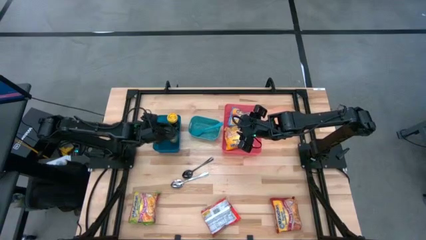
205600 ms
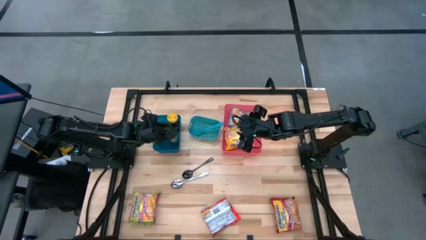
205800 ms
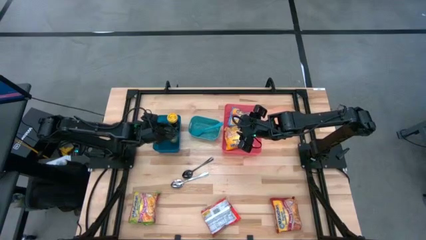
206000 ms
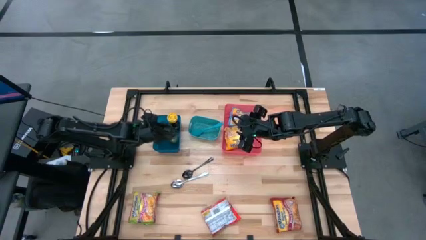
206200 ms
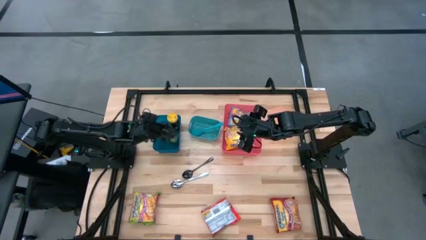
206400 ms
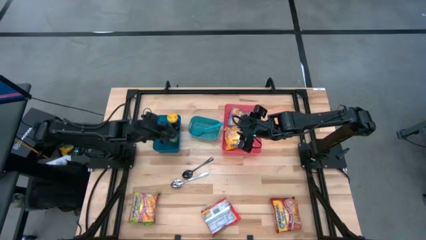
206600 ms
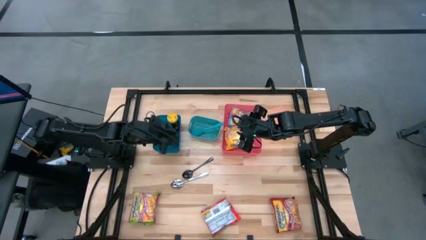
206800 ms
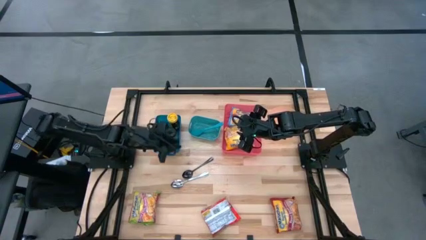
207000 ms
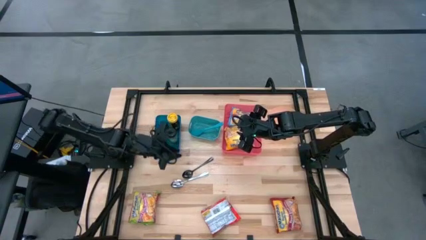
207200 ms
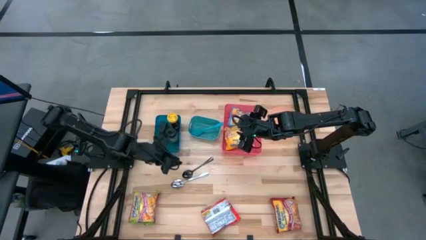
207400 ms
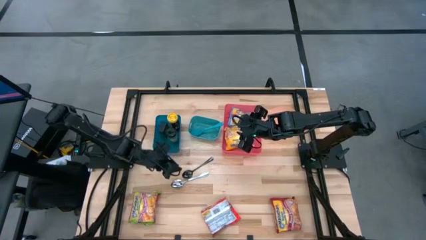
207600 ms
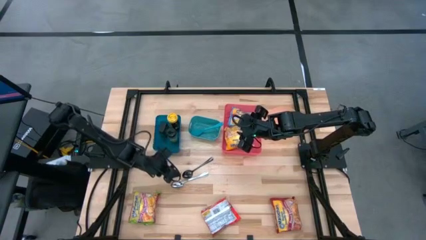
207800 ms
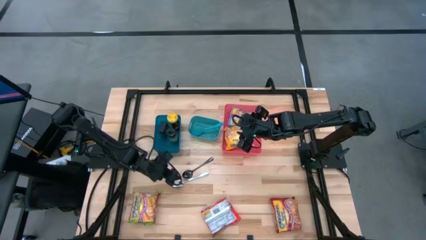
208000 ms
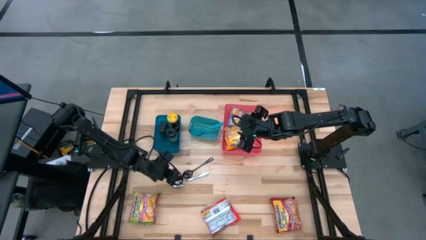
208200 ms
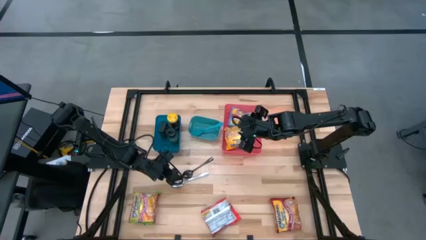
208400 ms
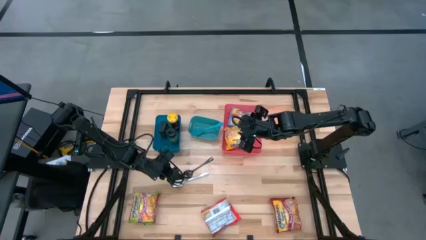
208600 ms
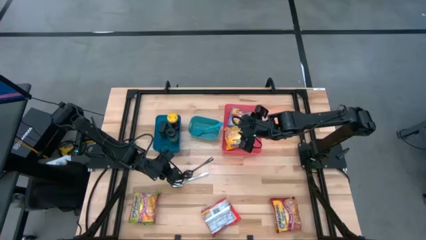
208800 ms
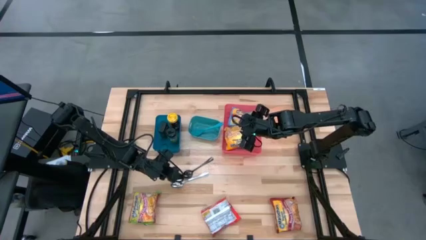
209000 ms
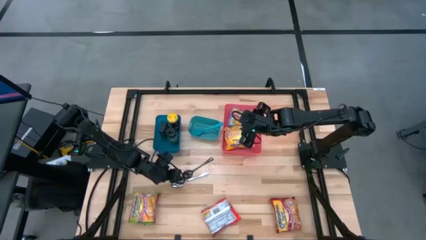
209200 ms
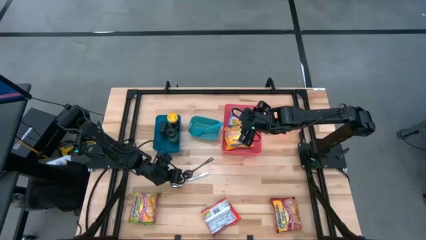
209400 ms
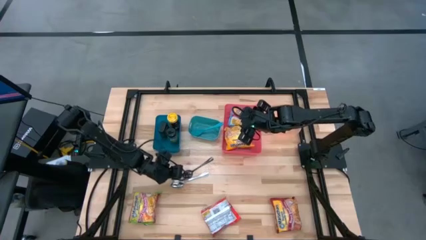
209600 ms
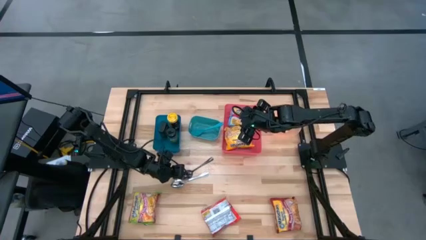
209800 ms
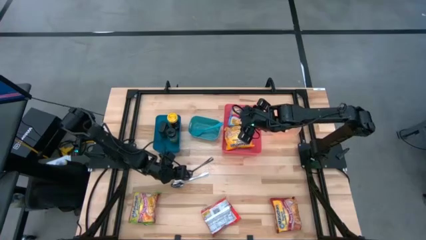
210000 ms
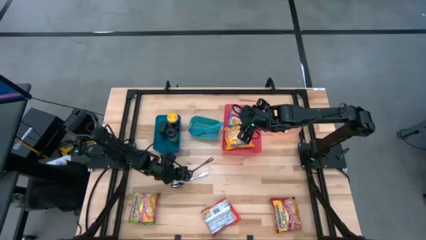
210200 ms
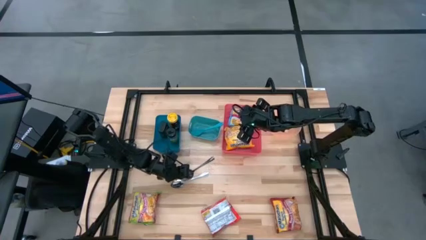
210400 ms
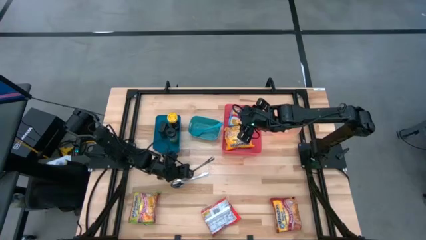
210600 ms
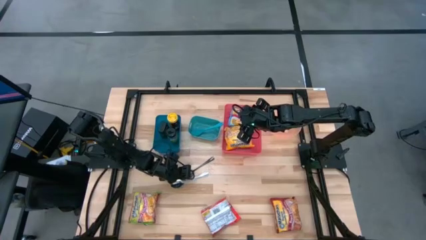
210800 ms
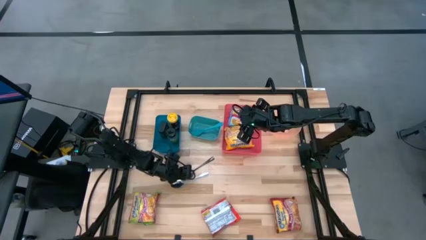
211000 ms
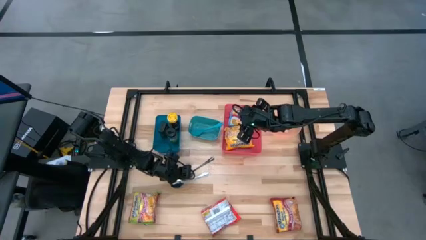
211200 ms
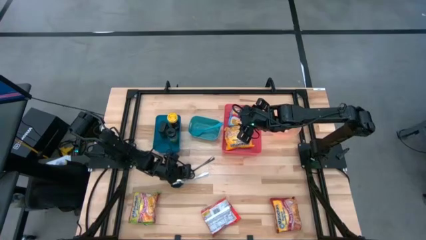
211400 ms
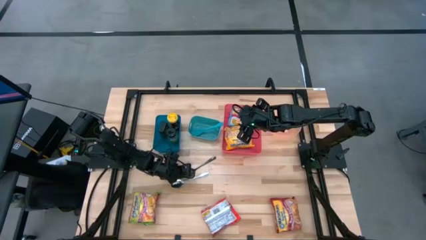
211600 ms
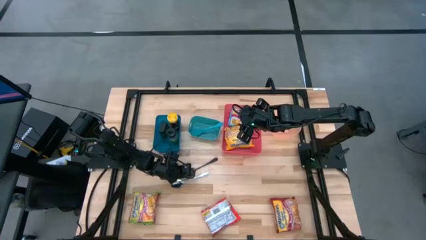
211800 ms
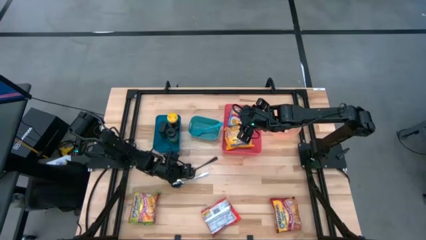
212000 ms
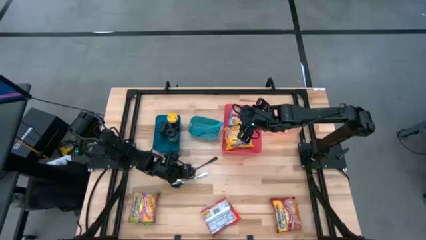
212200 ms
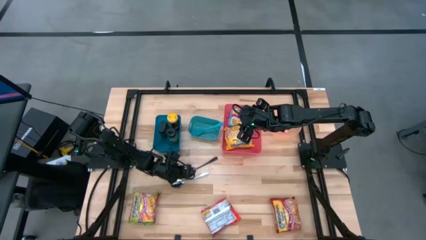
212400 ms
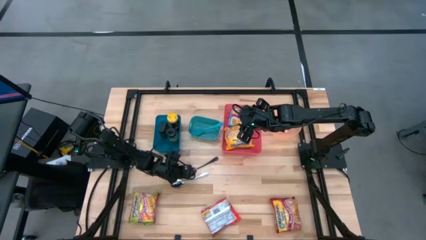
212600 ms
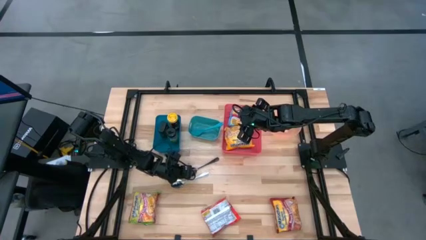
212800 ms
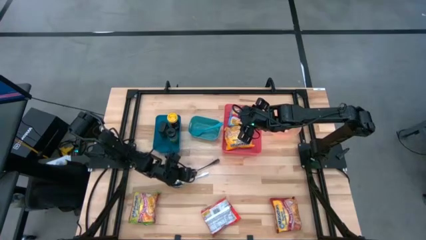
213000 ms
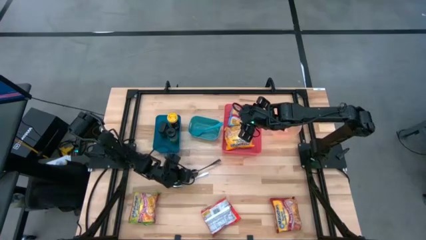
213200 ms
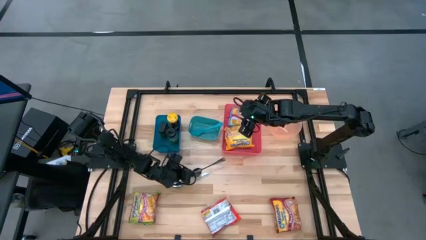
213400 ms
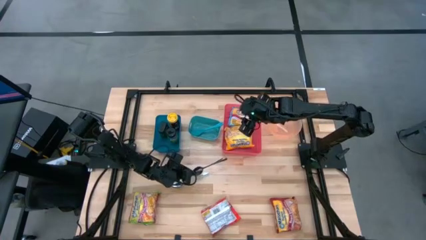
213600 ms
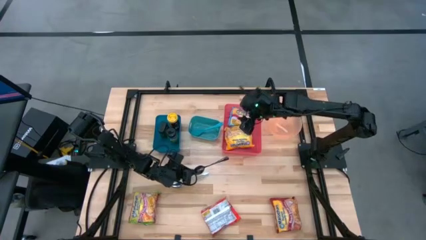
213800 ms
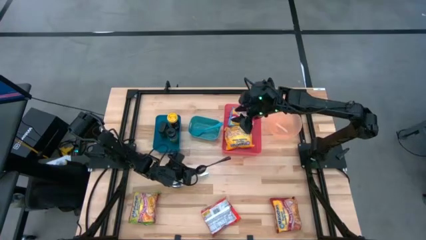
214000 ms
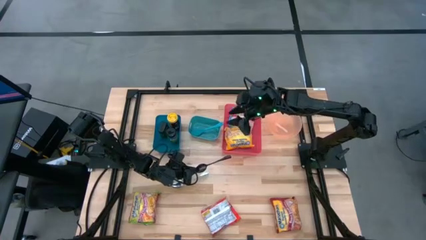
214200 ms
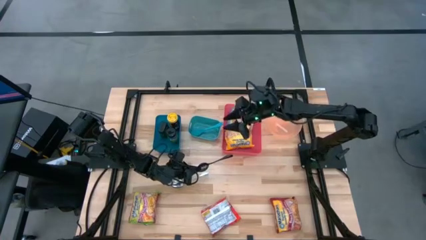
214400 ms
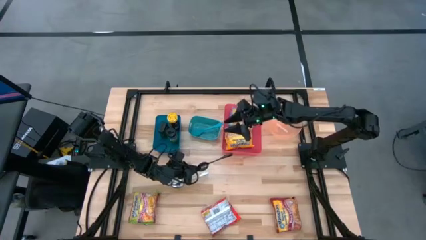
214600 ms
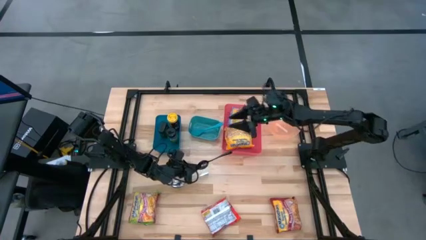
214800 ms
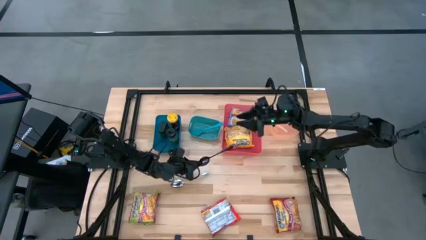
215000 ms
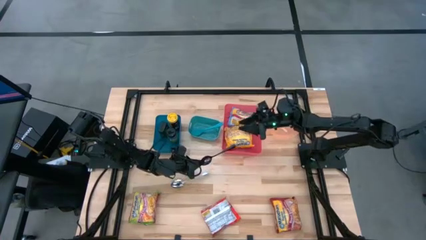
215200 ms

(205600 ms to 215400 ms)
Task: Pick & Place Food Item
Put the black spoon into the green bin

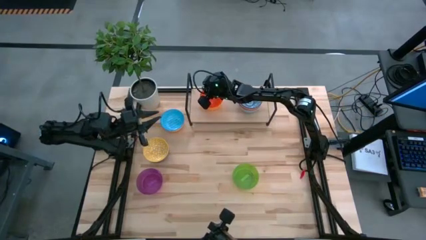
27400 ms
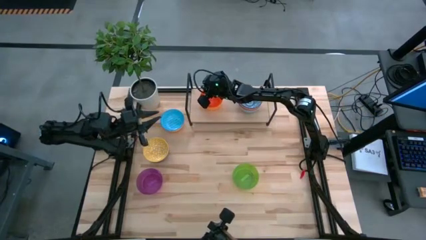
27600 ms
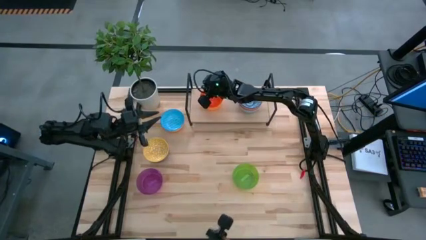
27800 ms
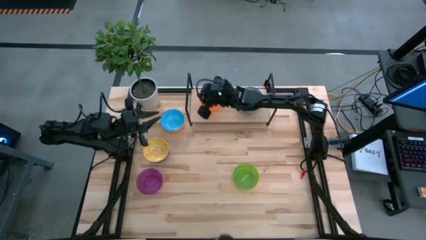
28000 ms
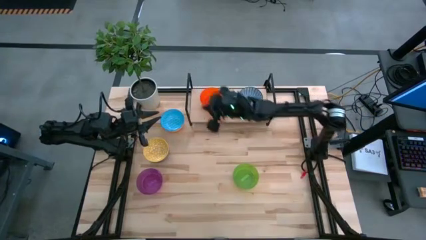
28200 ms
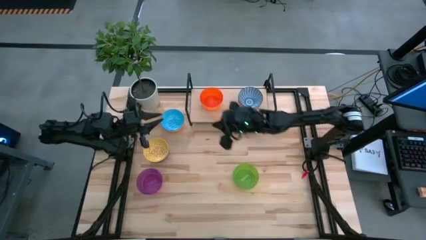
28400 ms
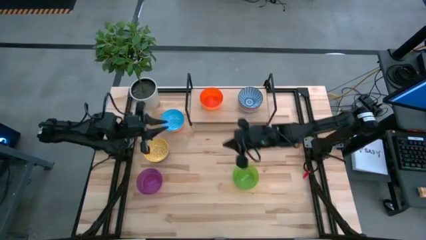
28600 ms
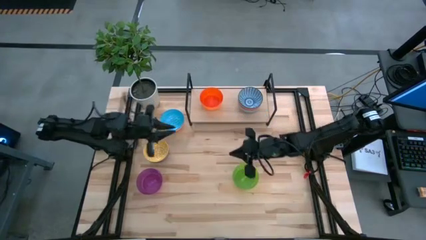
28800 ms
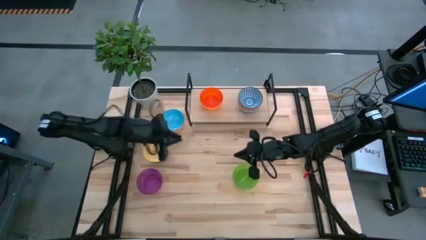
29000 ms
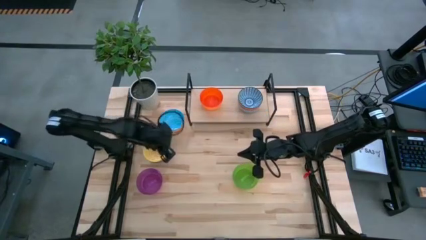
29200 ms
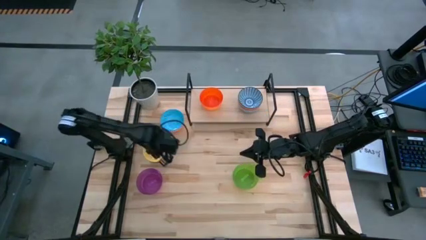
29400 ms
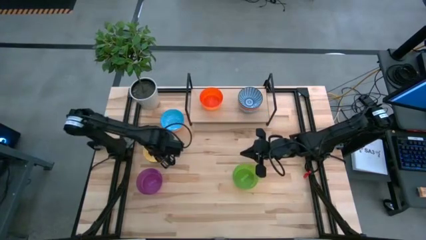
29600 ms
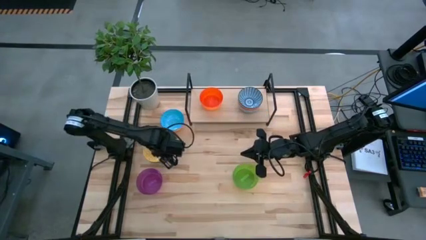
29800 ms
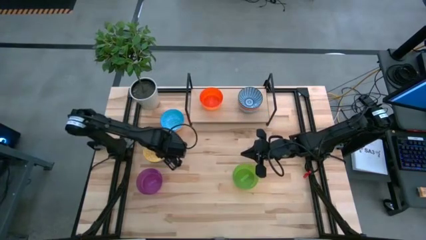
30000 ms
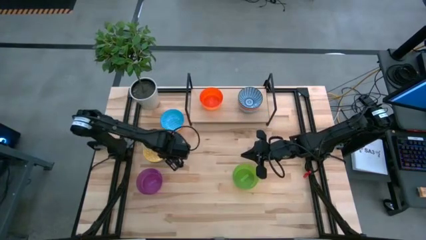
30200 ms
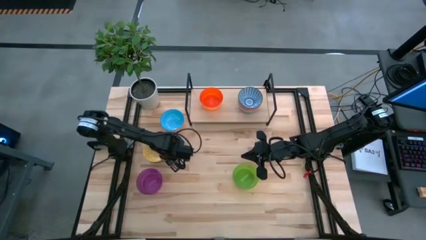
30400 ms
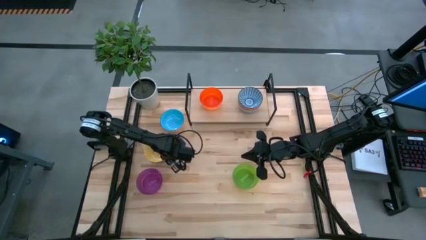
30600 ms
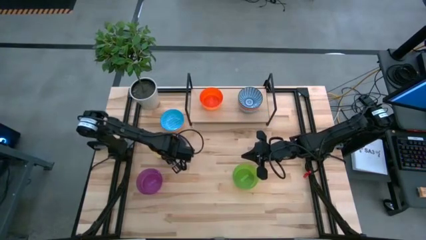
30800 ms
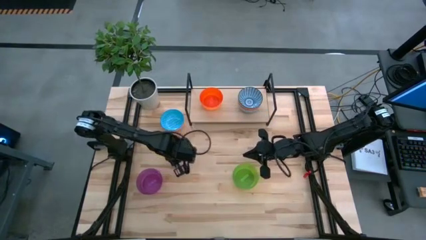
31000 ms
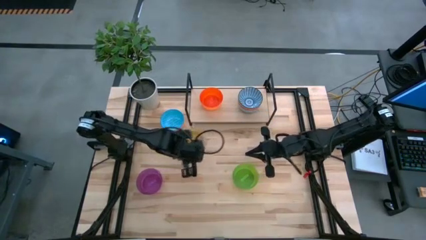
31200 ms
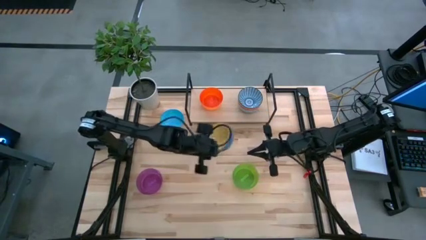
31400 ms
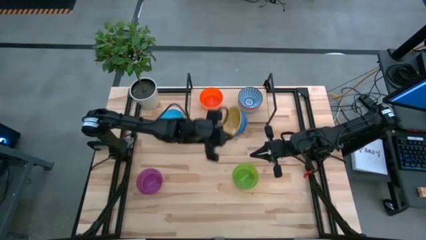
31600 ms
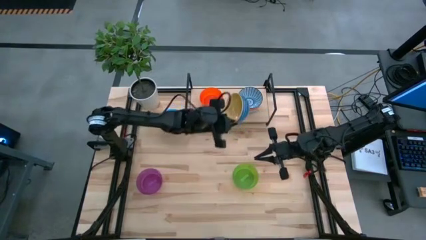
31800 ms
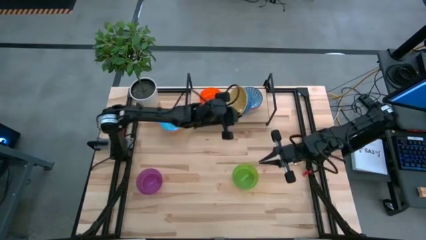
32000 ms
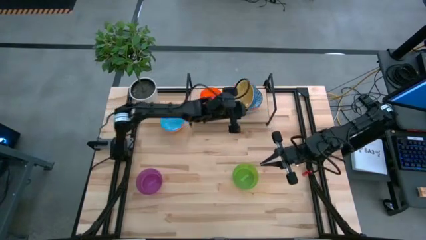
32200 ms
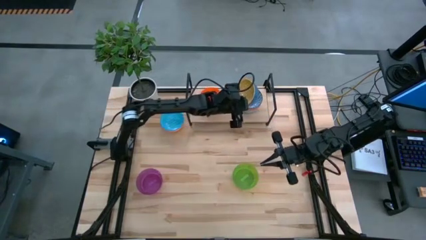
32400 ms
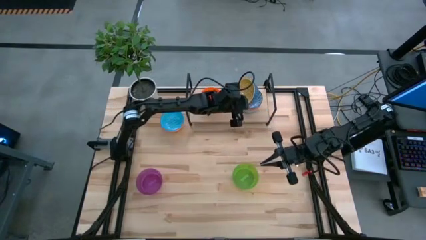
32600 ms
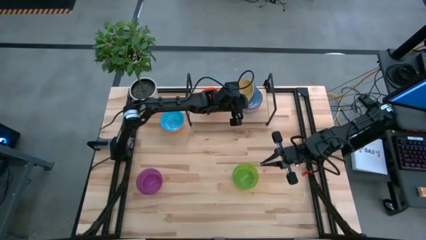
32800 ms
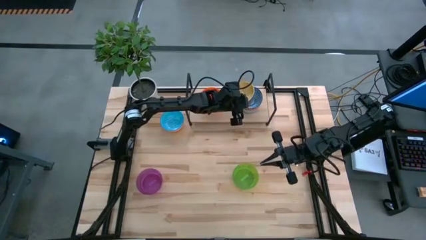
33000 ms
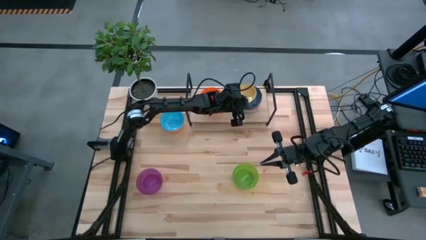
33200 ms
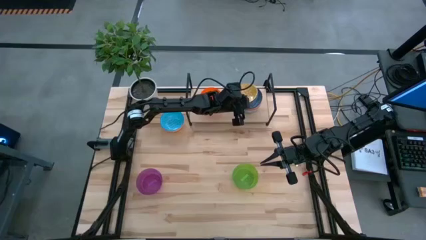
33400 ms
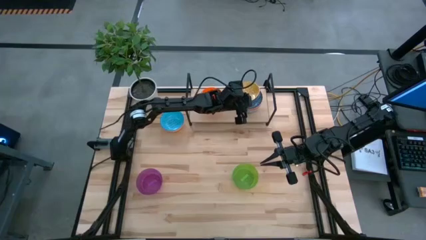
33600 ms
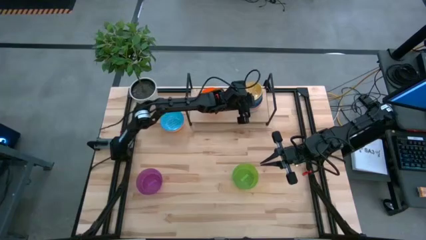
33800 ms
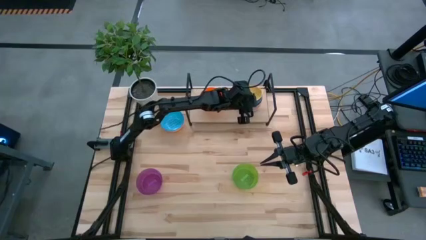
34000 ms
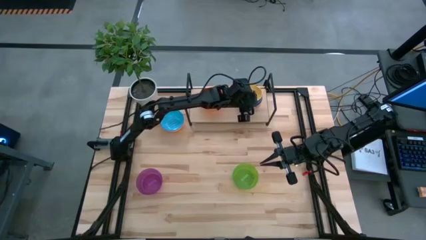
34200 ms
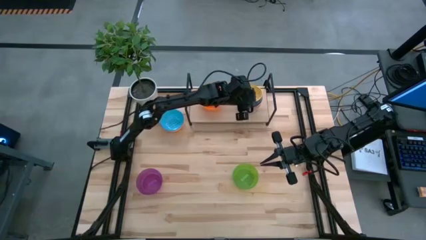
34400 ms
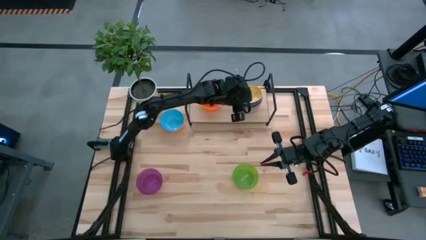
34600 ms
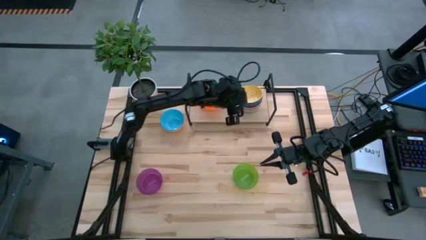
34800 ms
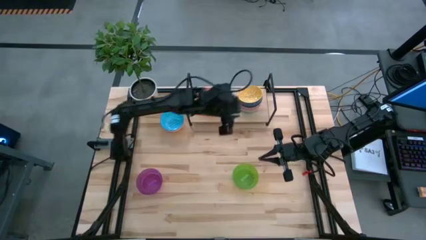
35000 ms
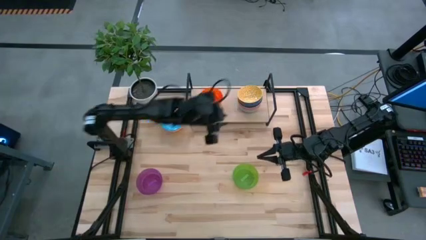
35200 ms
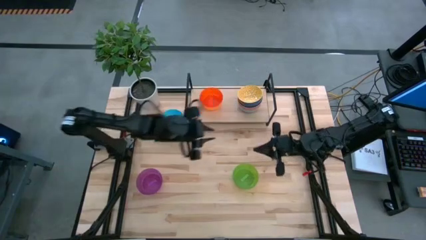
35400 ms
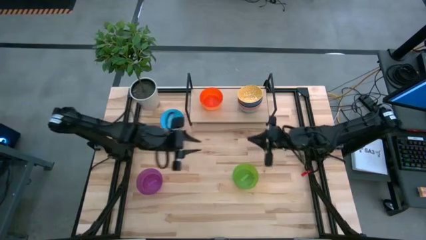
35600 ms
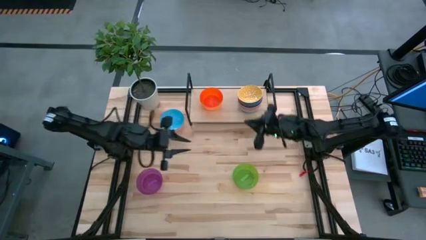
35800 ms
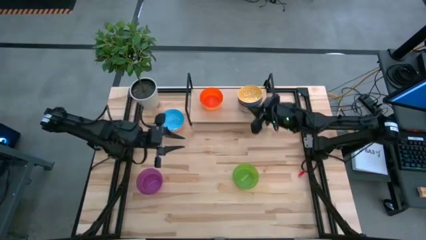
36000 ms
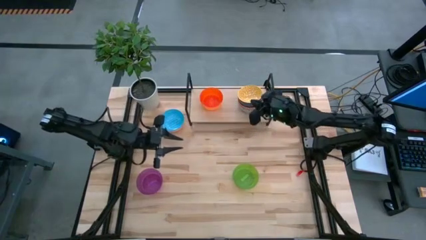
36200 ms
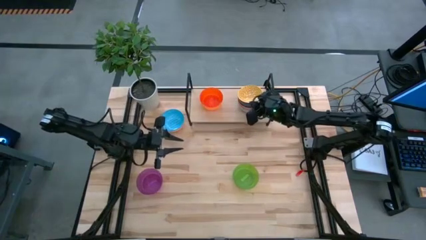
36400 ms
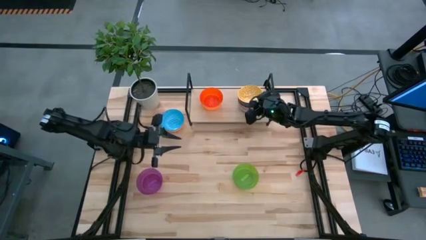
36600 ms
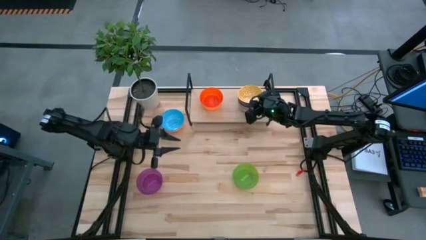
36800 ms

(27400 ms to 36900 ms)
Task: Place and stack bowls onto a shelf
Stack the yellow patterned bowl on top of the blue patterned bowl on the shelf
